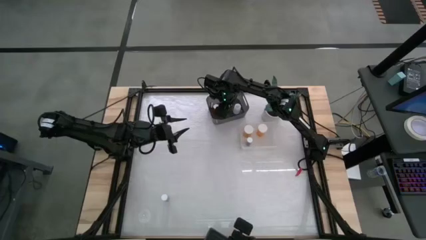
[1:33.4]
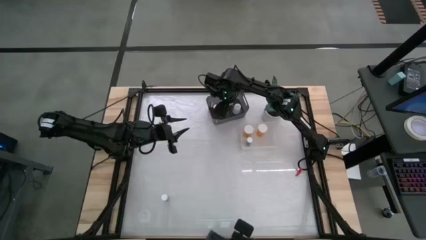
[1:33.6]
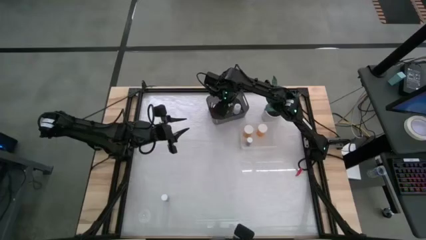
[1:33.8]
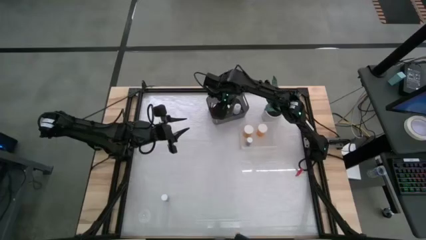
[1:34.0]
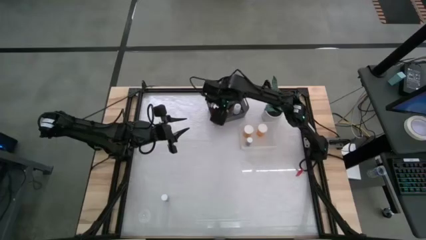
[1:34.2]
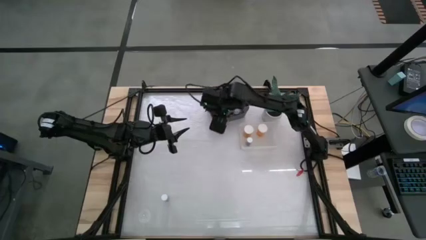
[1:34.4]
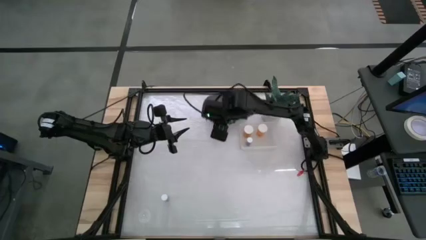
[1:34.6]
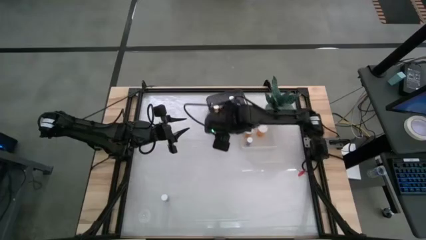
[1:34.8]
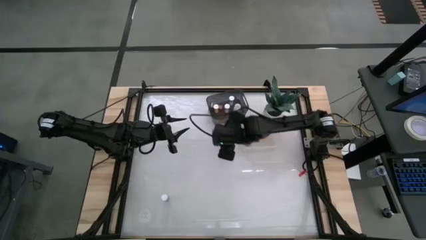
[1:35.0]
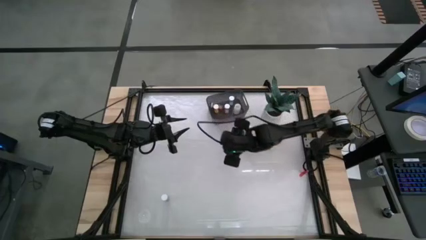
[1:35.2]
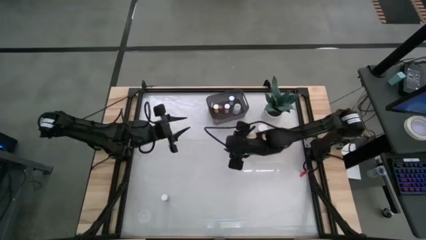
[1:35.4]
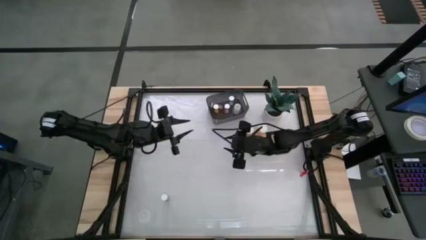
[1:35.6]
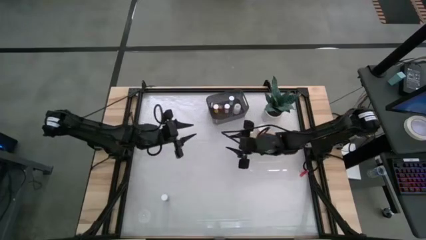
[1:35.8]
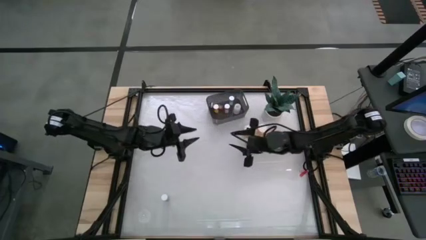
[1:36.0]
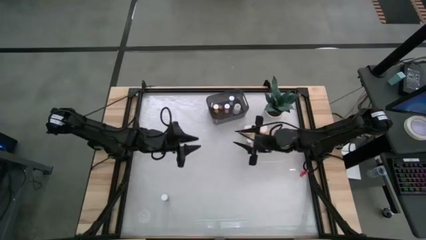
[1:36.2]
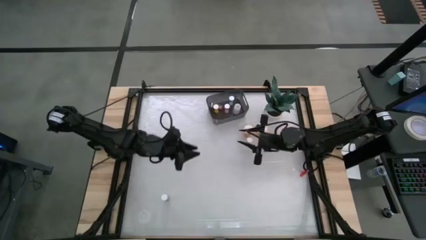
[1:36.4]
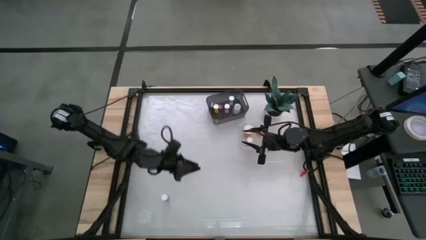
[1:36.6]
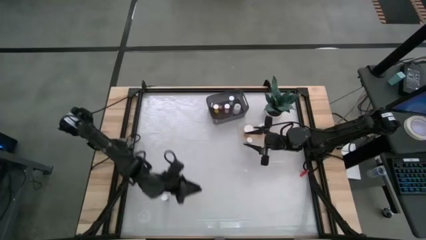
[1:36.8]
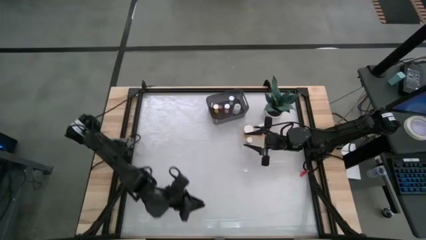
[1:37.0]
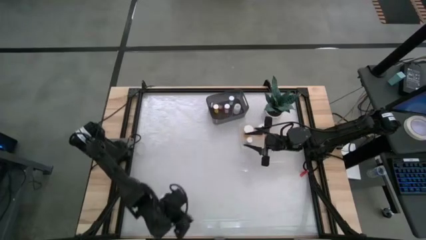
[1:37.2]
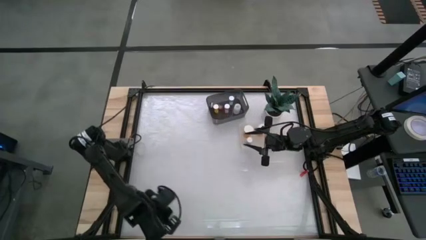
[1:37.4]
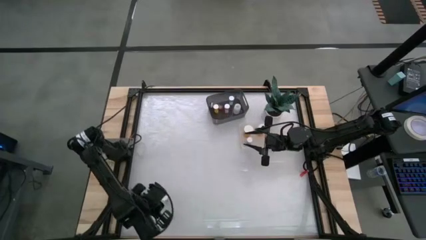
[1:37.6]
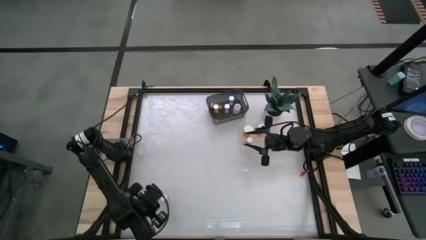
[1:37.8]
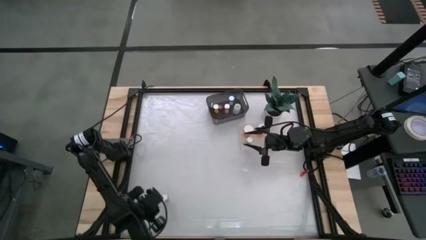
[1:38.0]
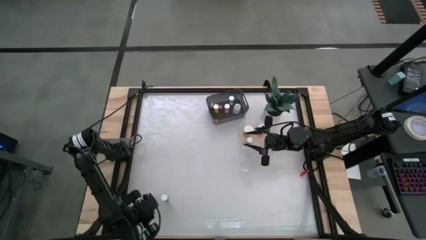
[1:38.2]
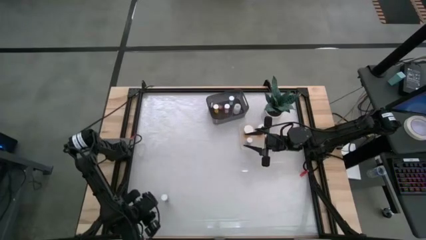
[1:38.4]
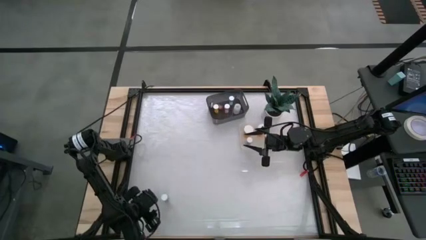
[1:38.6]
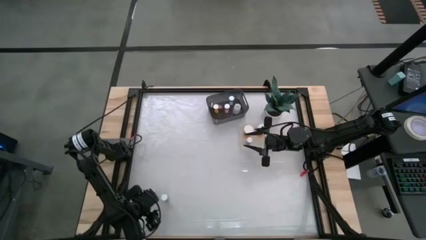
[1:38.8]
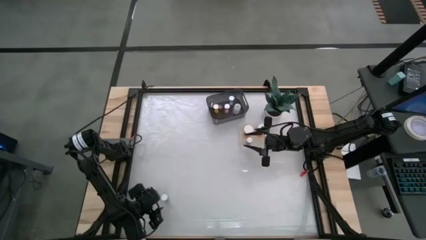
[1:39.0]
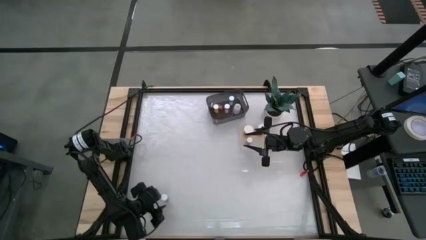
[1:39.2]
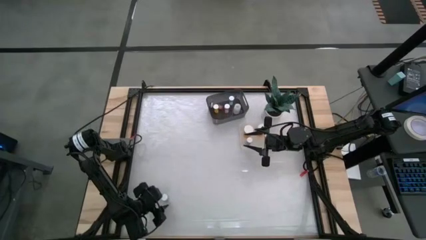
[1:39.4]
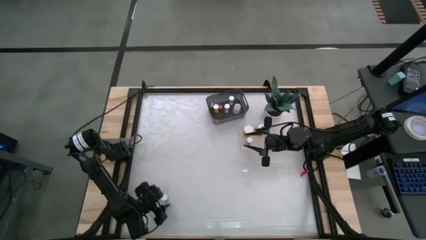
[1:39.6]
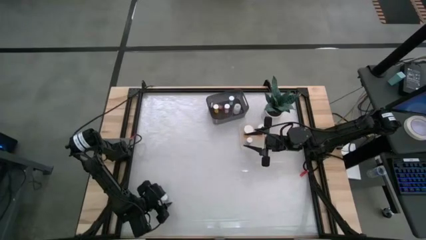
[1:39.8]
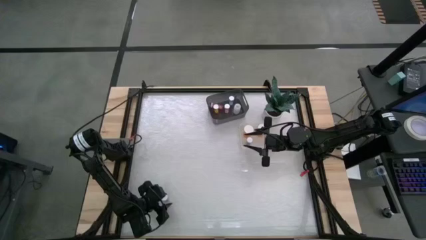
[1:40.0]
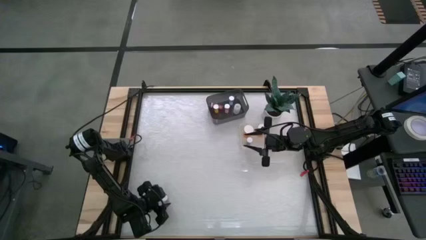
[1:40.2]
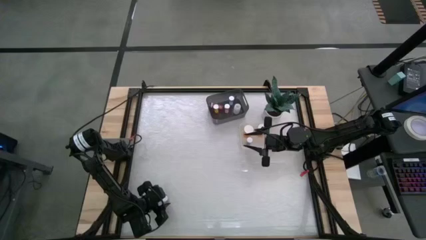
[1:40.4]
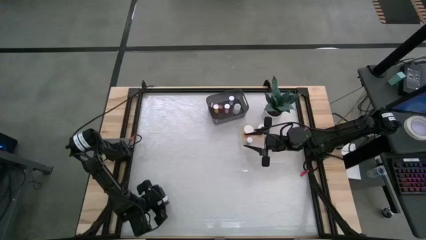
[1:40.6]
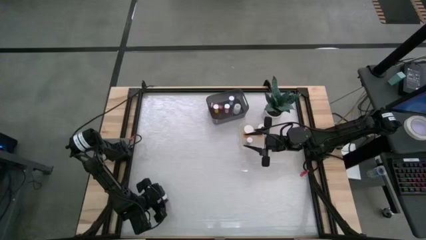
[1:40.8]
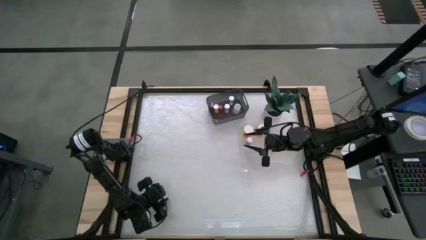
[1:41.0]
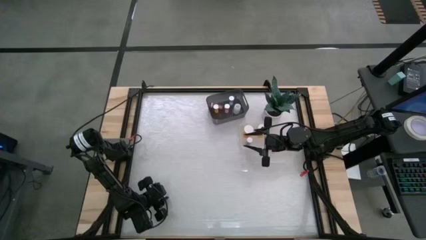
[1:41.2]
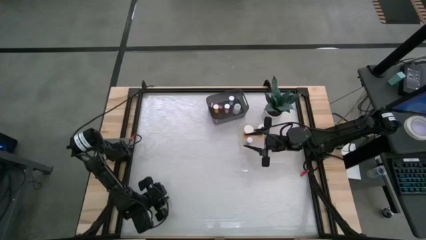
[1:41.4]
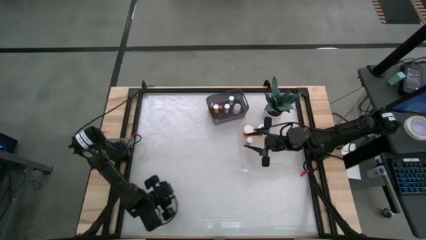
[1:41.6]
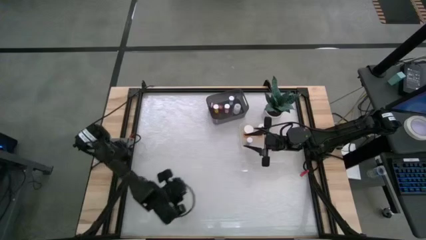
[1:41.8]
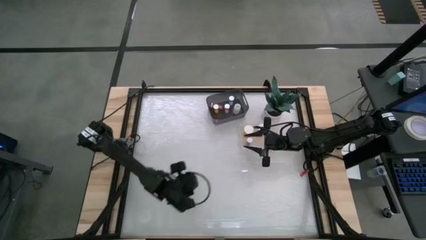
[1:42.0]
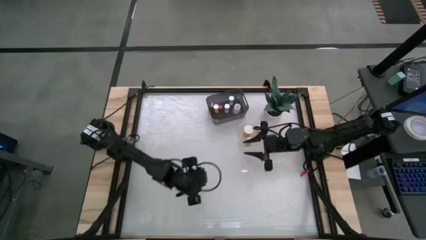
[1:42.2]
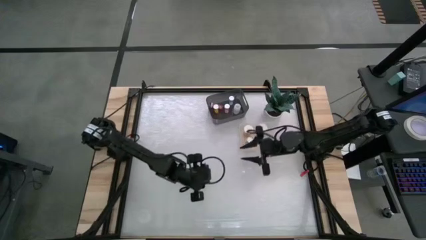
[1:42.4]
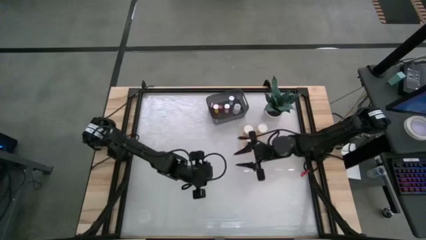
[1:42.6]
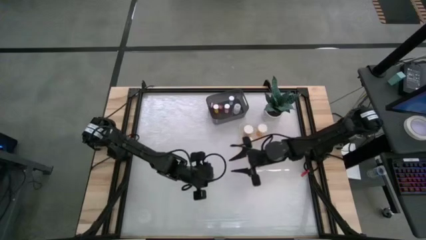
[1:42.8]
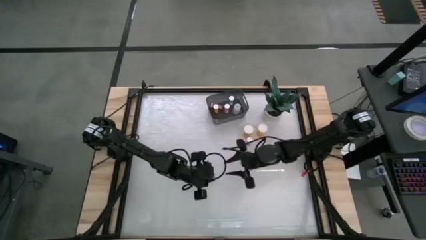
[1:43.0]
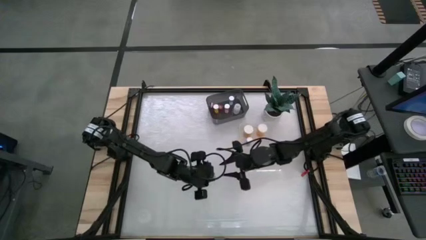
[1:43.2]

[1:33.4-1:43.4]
Task: Pick and place medicine bottles into bin by pill shape (circle, oval)
Put the blue pill bottle into the transparent bin
